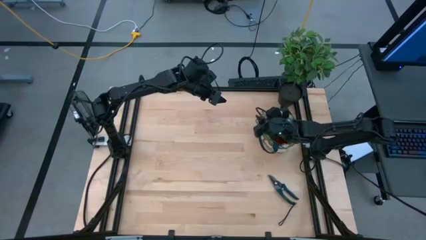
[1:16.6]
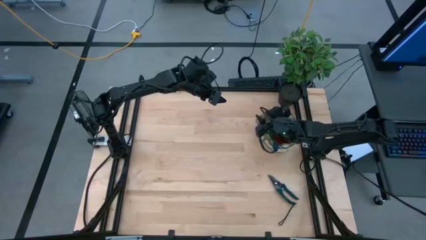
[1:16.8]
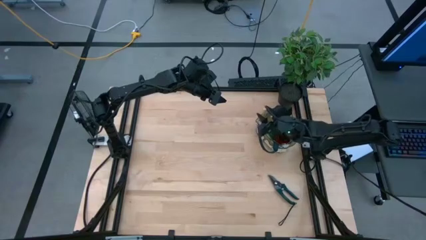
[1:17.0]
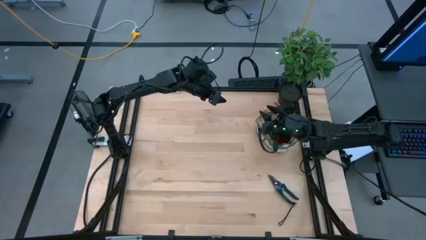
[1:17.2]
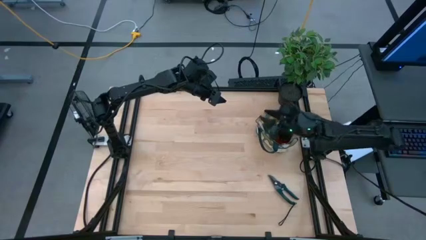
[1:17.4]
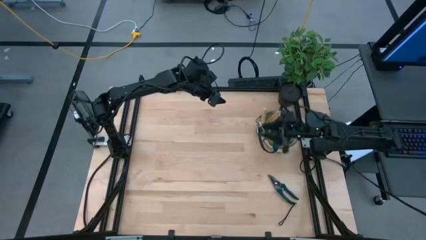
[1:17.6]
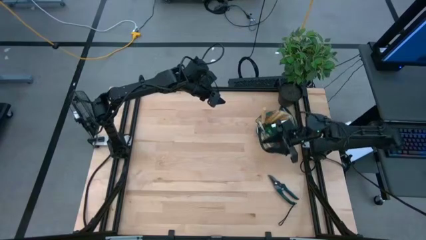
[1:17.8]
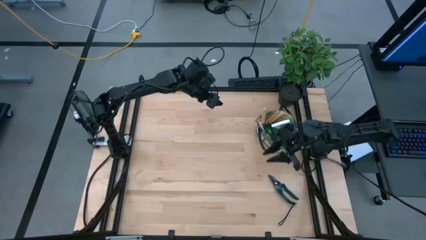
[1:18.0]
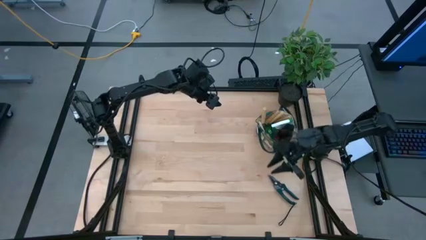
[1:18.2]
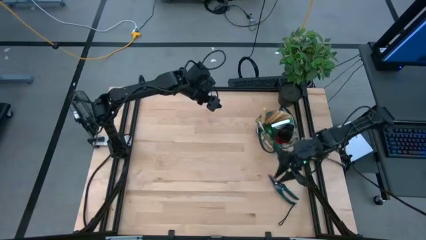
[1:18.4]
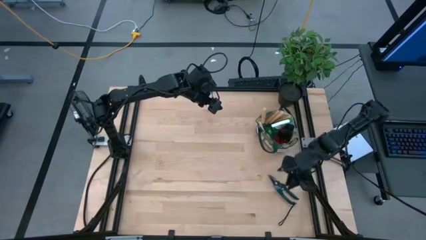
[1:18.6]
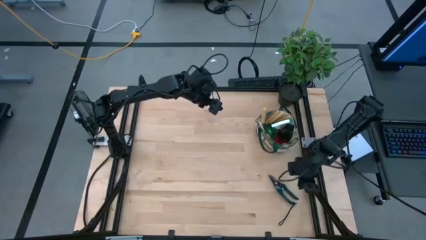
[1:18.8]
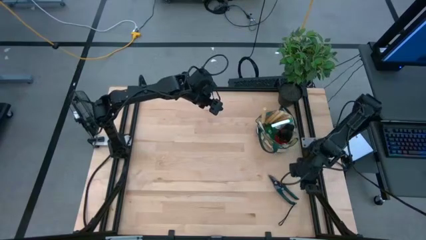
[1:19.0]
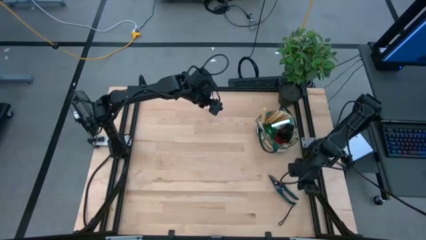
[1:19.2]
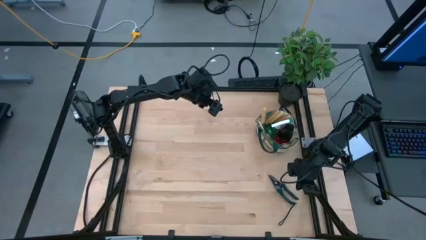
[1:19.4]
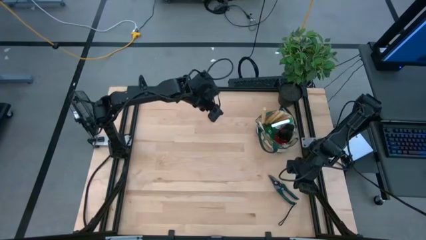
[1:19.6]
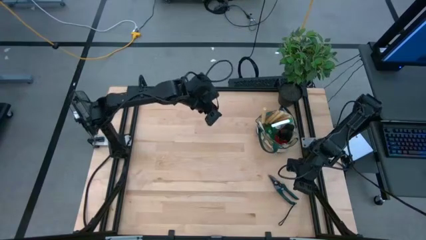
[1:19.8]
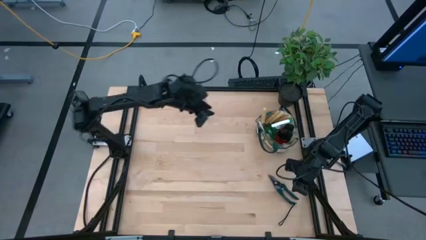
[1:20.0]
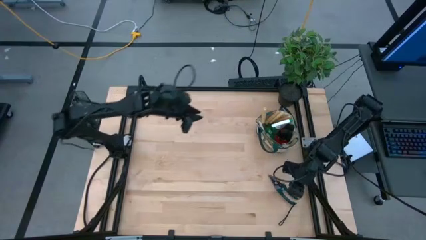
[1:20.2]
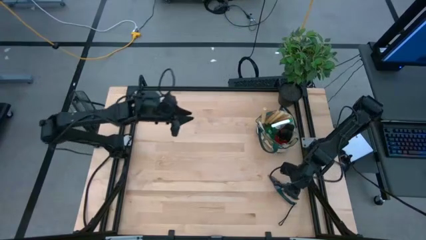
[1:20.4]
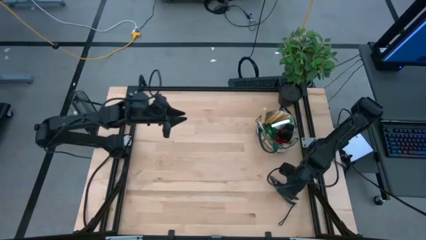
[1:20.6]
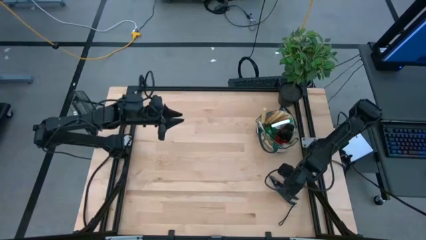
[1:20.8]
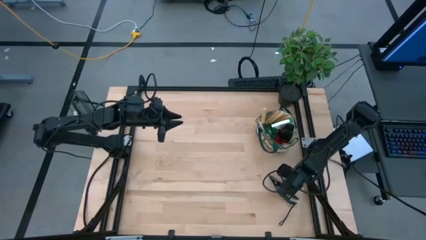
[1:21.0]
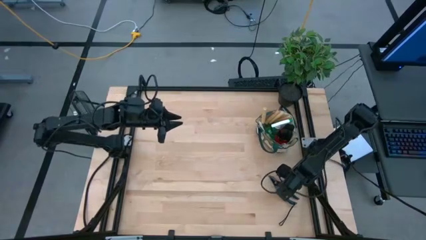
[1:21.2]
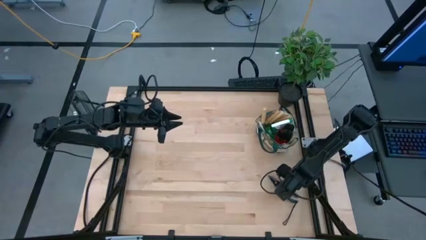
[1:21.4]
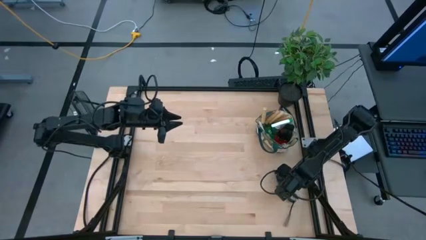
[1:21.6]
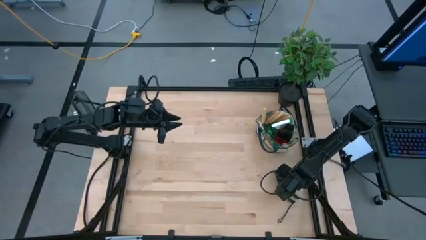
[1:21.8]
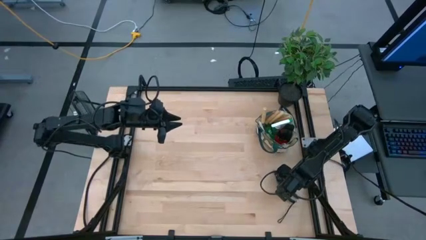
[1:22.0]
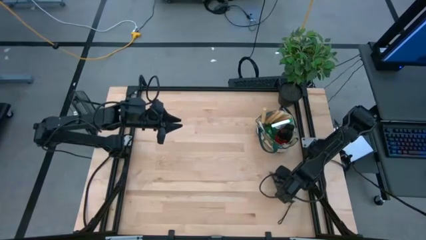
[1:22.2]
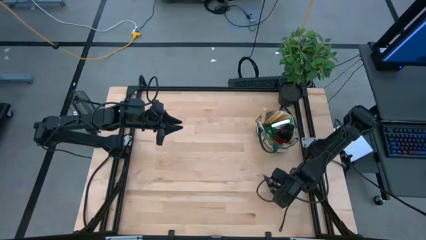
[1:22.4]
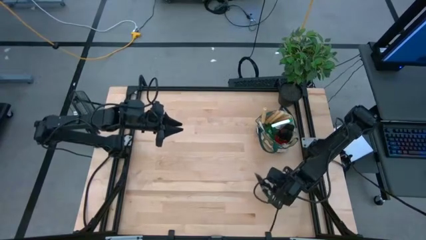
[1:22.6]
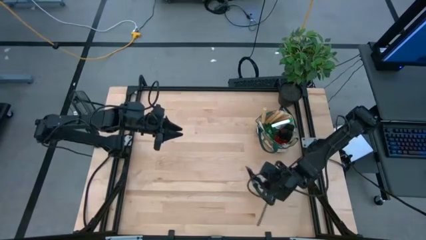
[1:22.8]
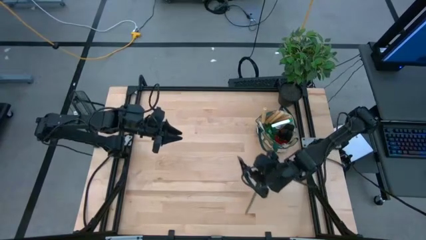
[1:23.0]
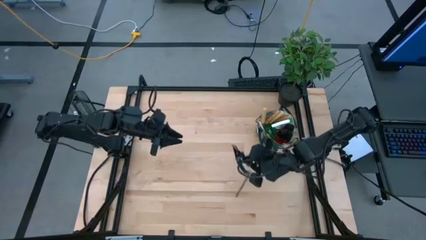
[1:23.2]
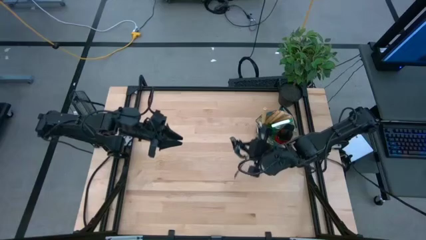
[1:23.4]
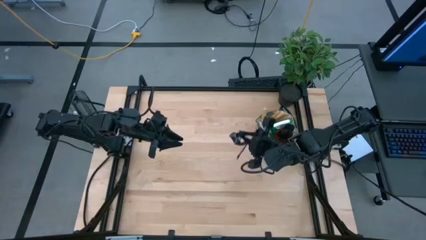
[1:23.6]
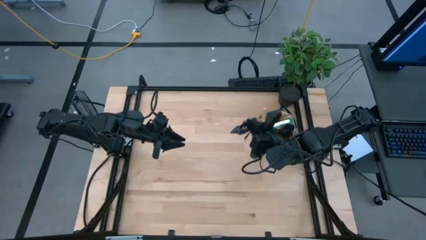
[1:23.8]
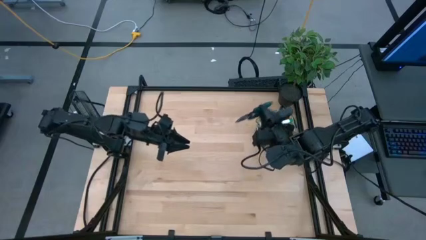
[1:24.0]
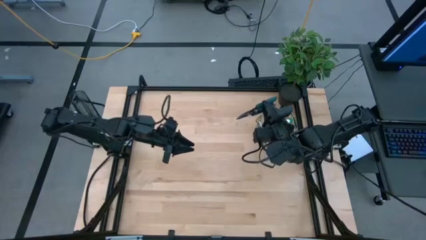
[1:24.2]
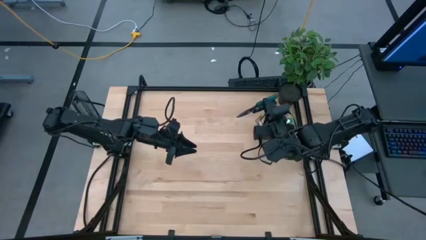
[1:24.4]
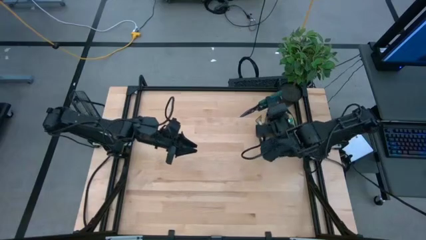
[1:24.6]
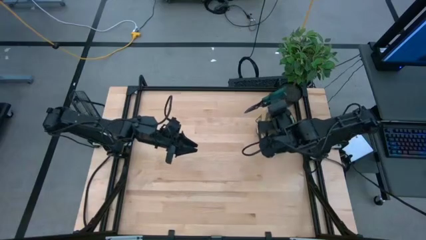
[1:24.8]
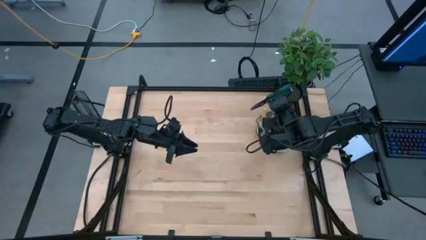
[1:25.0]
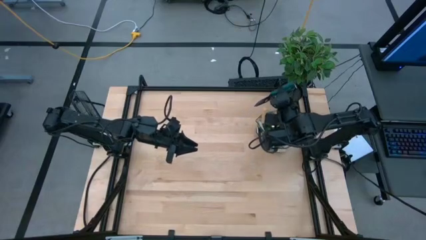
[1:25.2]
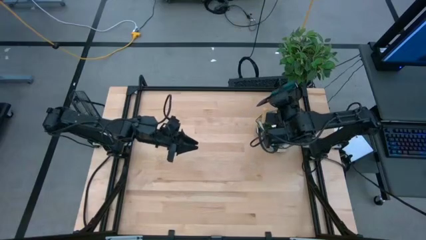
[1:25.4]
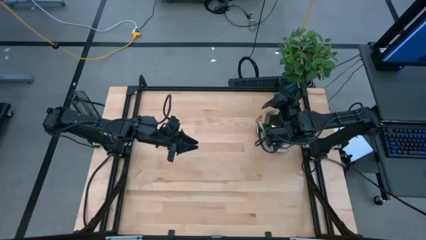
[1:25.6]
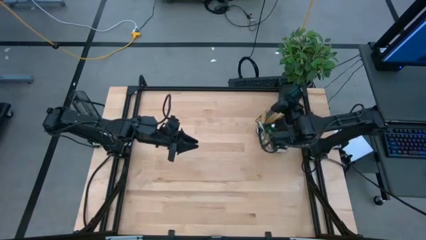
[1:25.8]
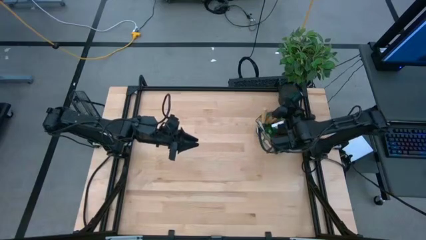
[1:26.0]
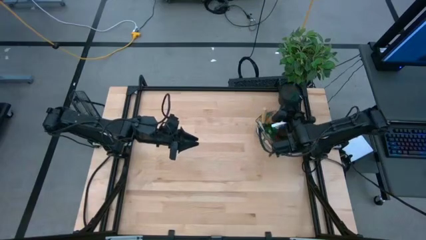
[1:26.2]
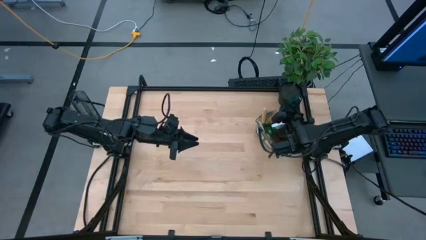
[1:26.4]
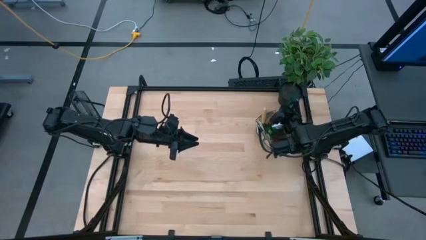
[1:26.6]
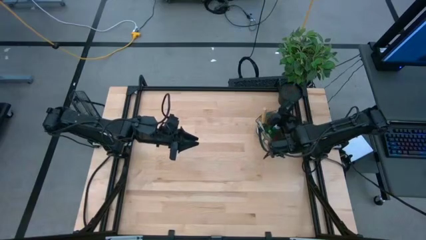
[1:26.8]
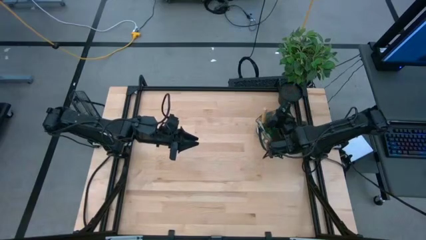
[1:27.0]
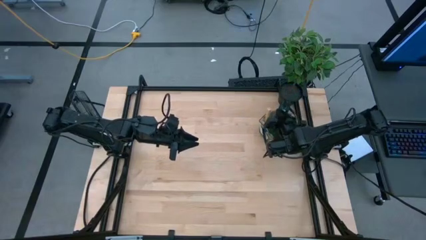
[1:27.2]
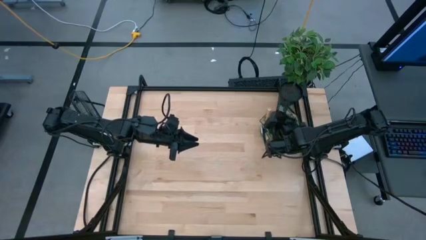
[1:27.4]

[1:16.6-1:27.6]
Task: Pick & Place Garden tools in Gardening bag
Put the green shear scissors into the gardening bag

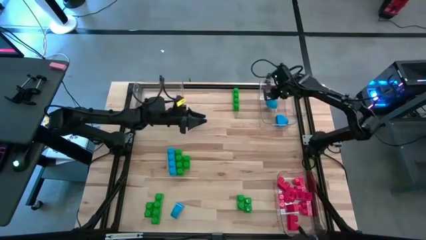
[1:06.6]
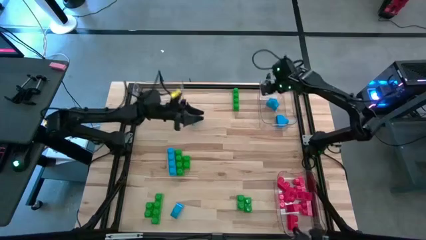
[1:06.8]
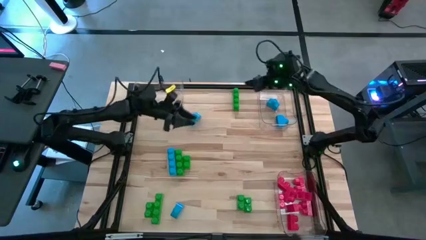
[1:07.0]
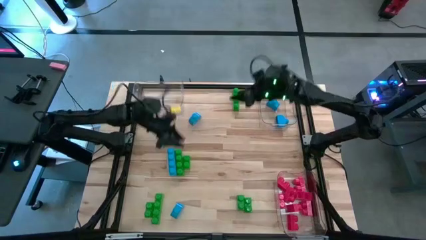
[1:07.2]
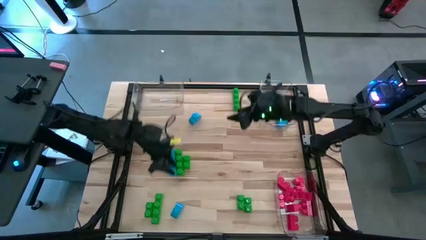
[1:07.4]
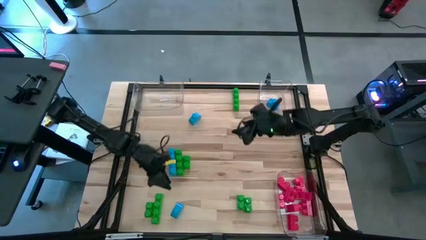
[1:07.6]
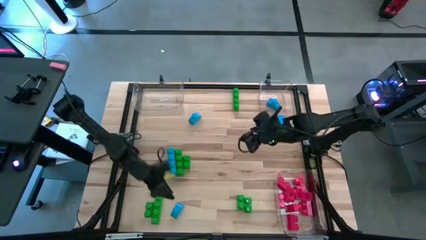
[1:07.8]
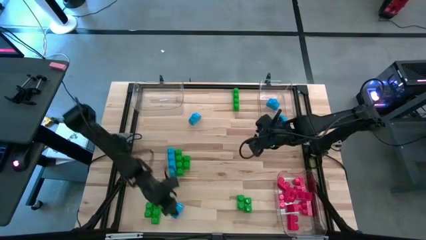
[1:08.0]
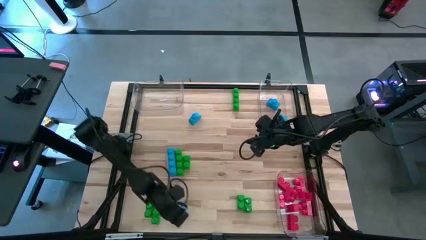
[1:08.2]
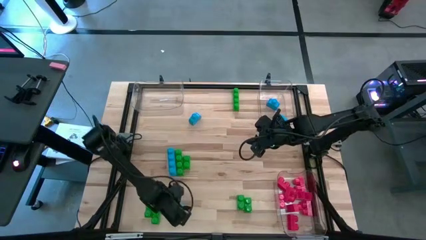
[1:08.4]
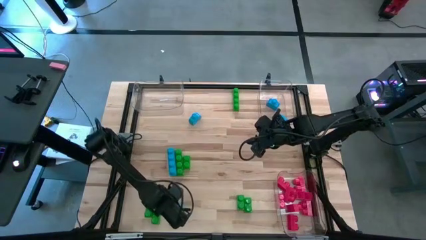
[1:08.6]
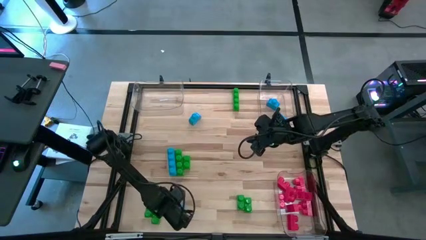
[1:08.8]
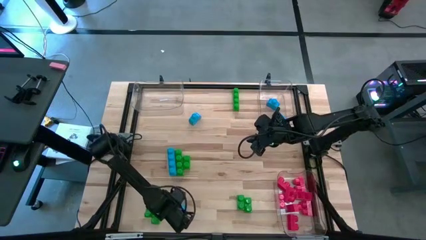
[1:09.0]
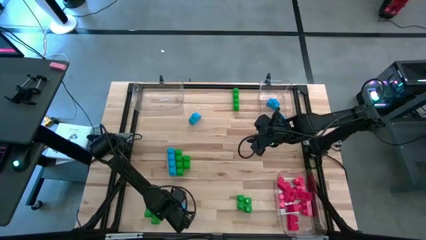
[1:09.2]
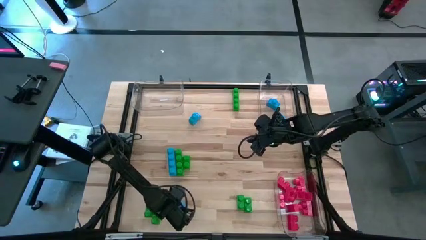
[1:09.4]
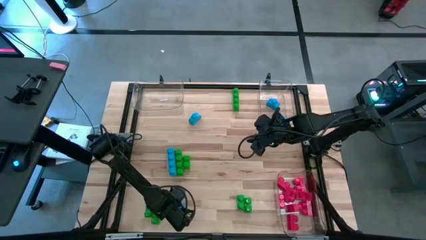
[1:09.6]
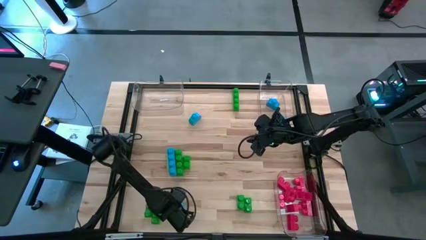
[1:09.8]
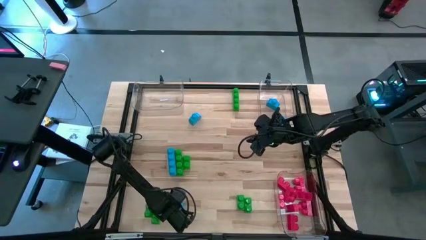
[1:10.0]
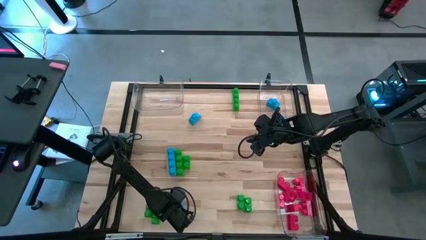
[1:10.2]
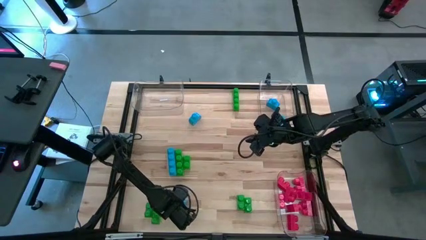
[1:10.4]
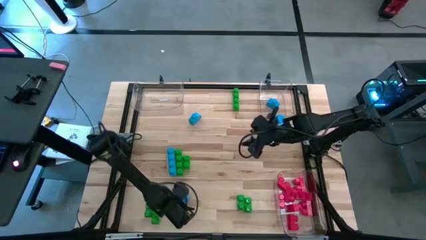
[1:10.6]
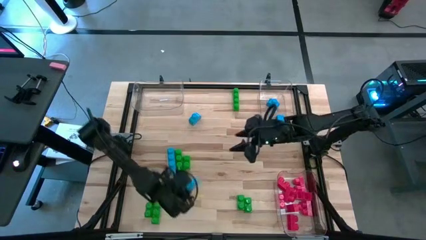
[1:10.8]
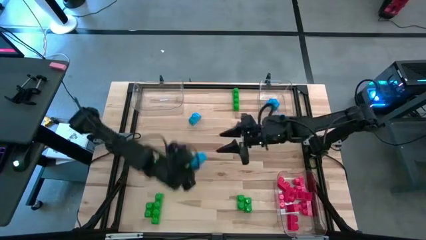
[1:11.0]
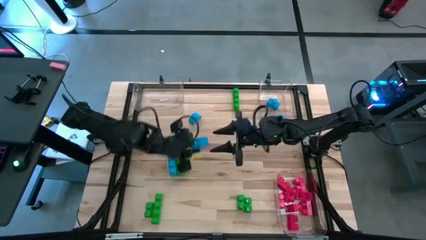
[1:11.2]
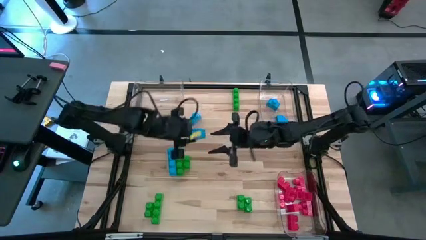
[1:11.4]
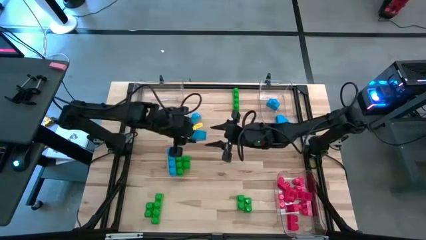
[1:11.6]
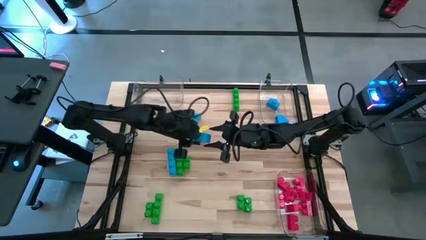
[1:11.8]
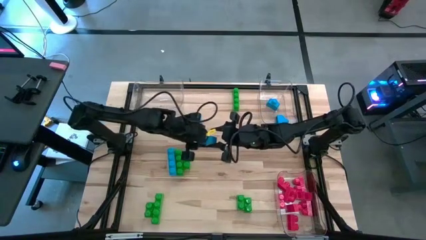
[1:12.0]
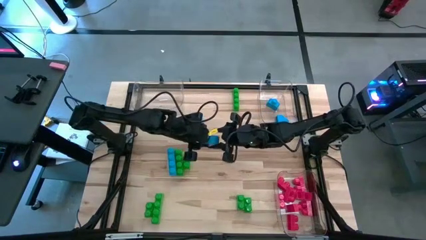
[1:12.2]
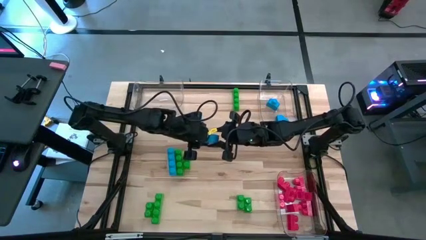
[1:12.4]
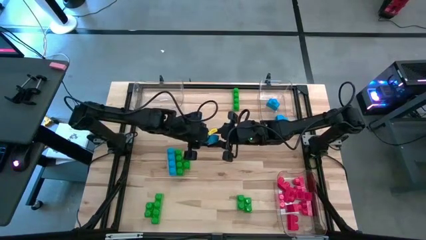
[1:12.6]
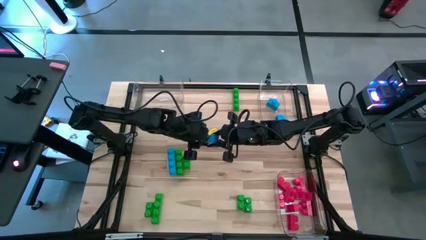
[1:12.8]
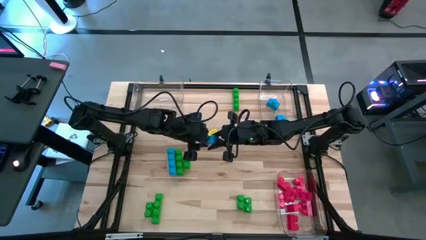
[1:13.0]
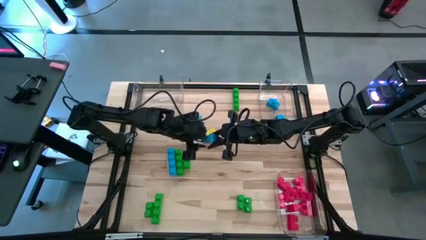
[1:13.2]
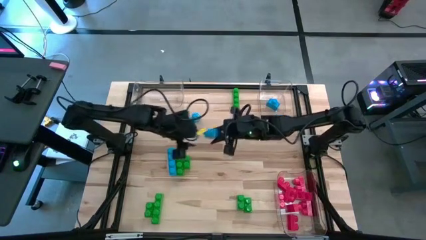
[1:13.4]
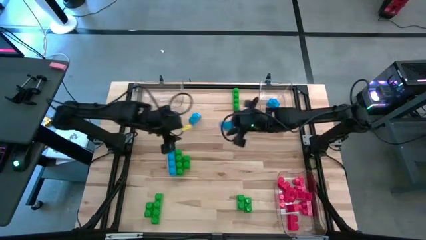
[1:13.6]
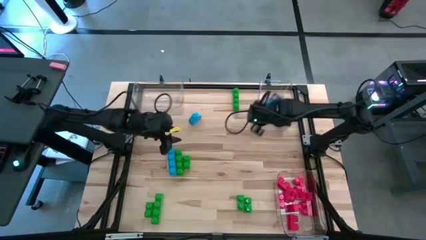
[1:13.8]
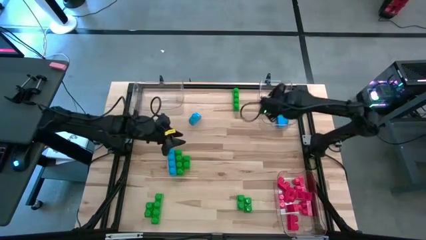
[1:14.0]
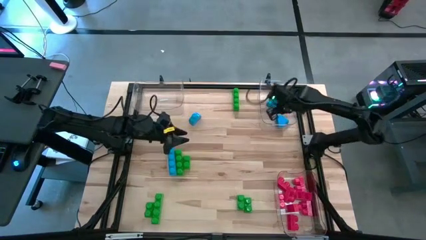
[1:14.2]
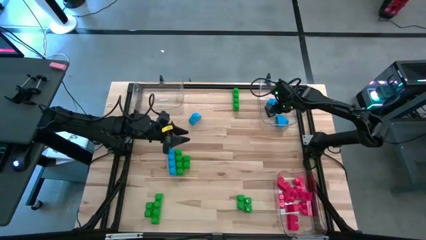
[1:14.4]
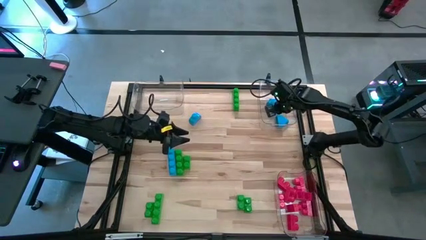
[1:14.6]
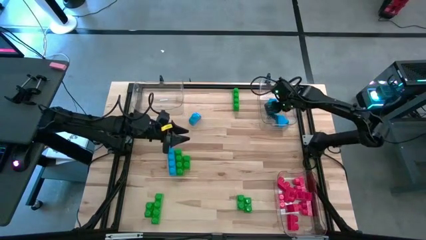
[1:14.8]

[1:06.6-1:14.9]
Task: Sort blocks
Put the blue game piece into the top right transparent bin
